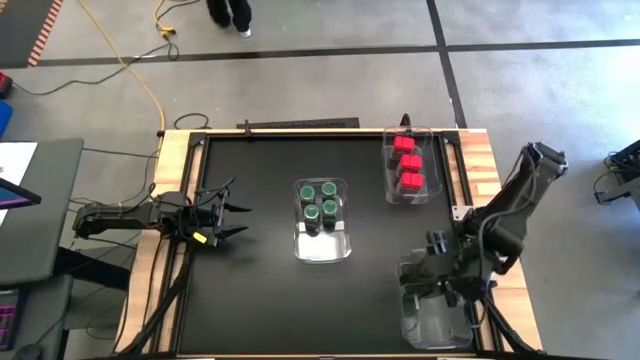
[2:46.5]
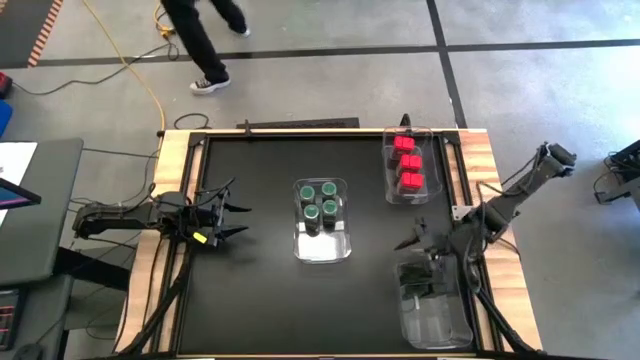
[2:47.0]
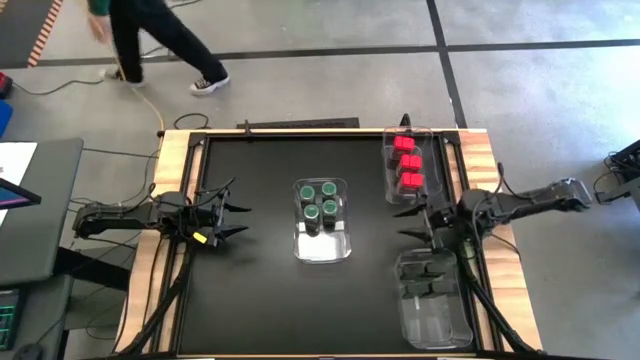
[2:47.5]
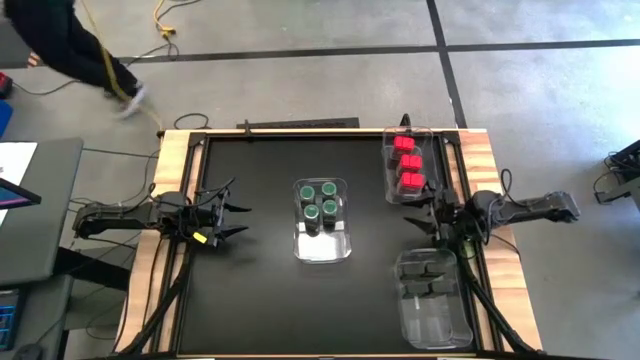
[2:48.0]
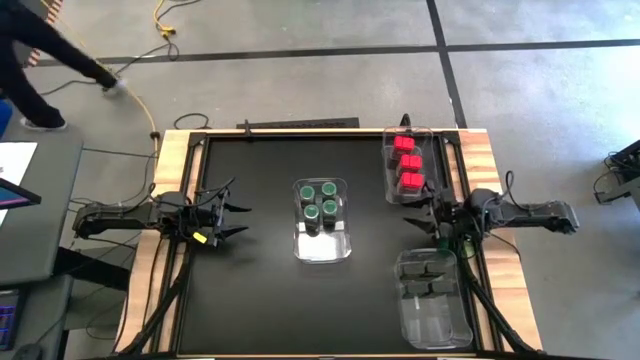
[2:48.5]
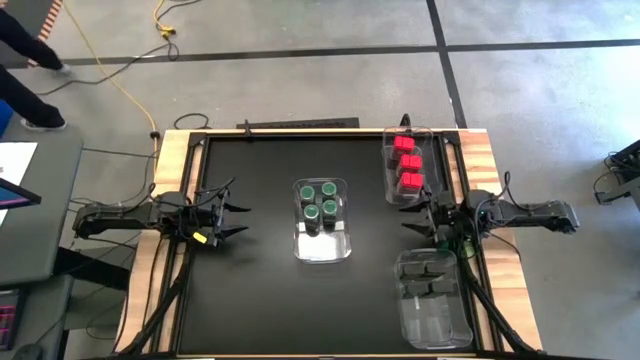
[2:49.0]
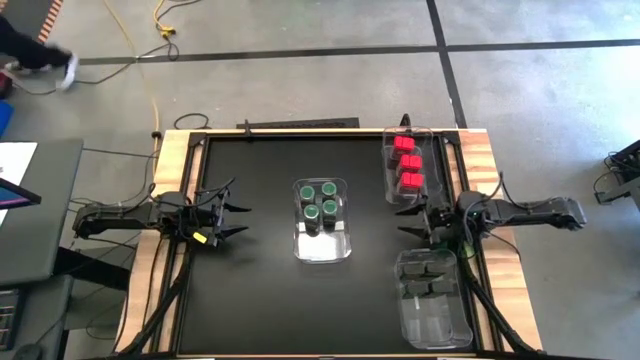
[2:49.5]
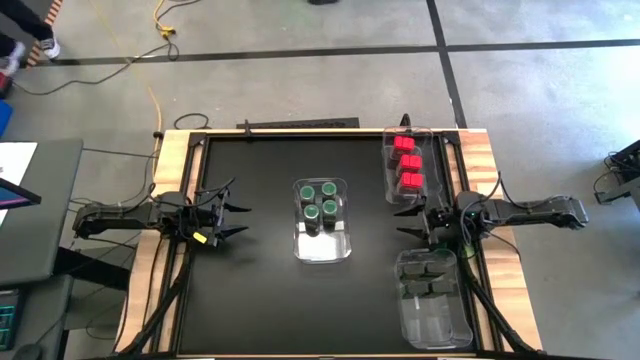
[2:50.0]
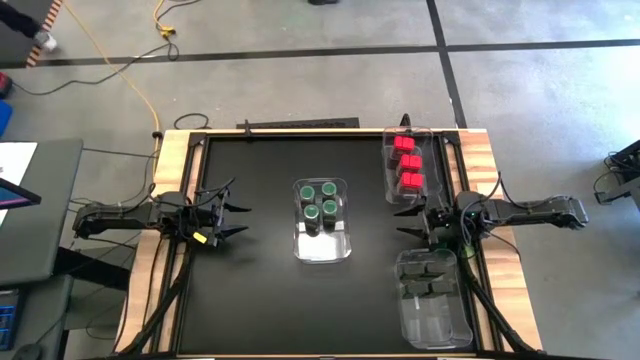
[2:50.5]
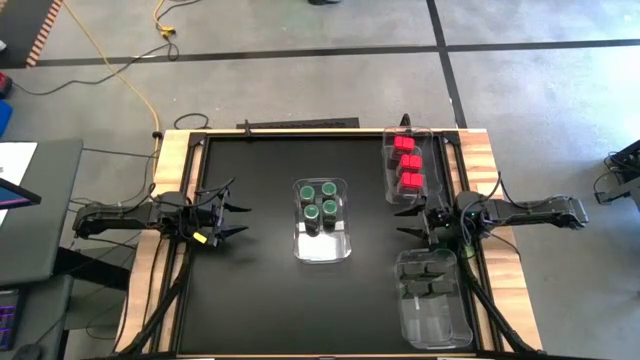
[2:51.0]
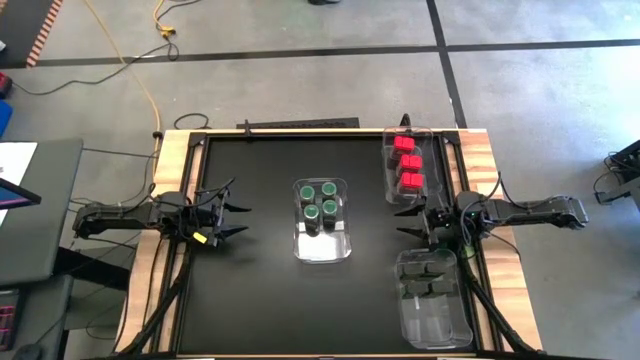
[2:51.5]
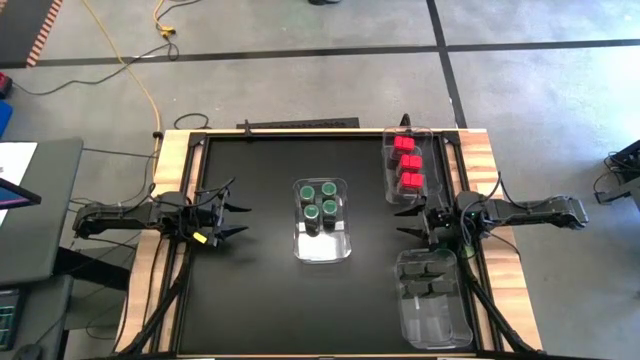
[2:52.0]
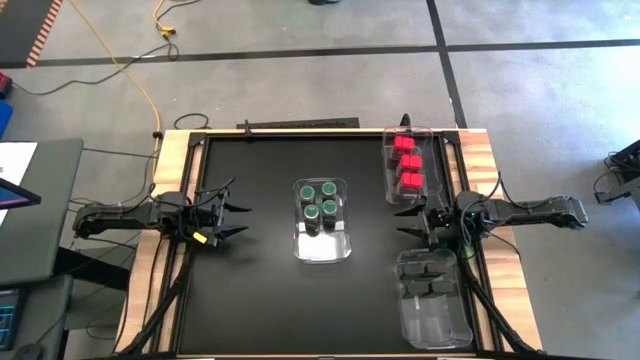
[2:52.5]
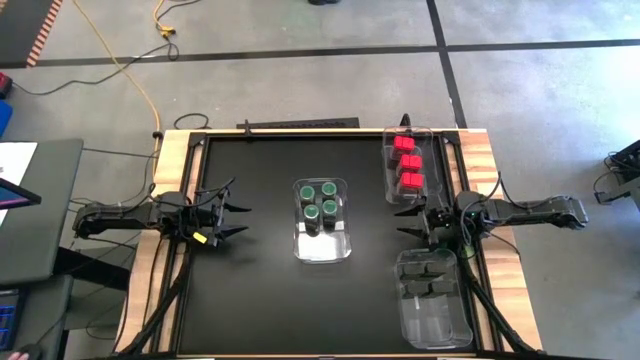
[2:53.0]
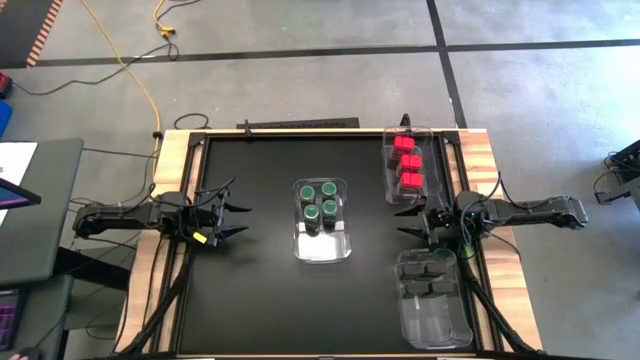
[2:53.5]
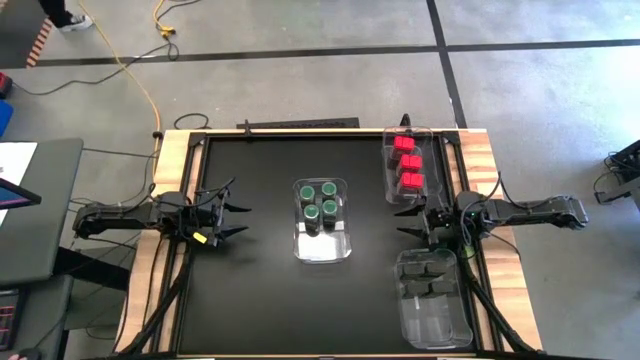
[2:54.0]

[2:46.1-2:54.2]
Task: Sort spices by type
Return to Home Position

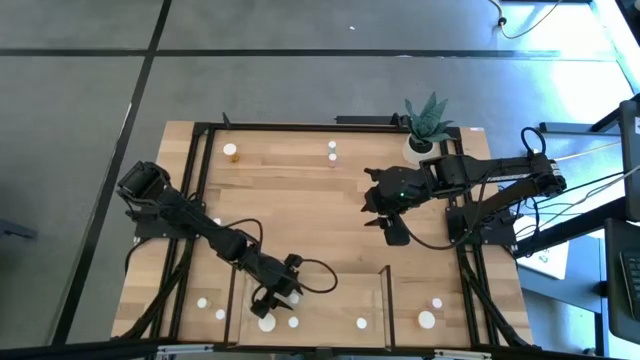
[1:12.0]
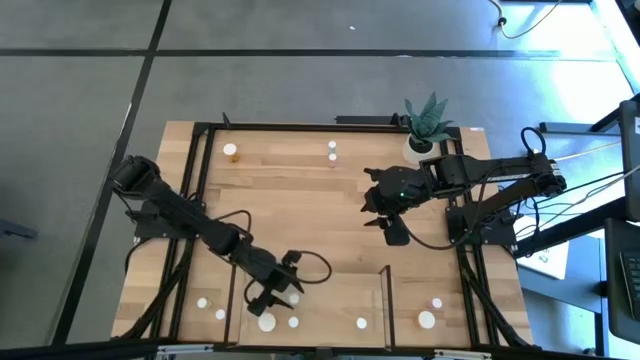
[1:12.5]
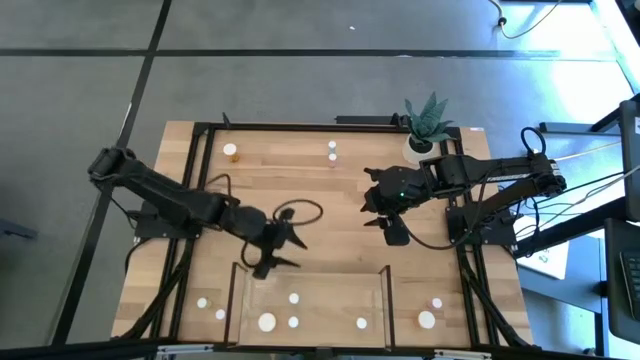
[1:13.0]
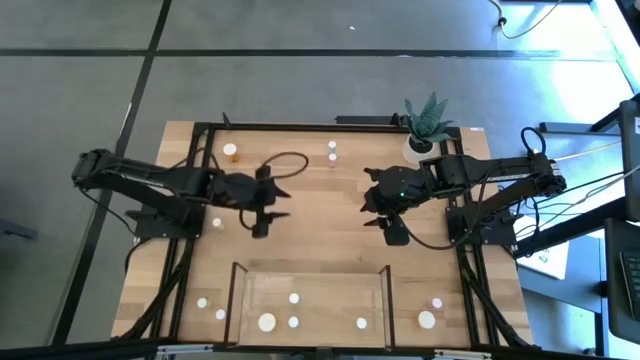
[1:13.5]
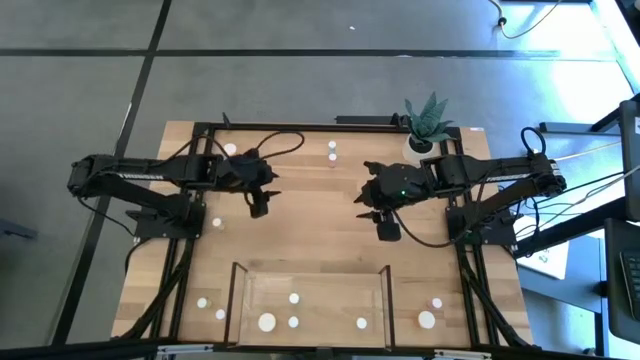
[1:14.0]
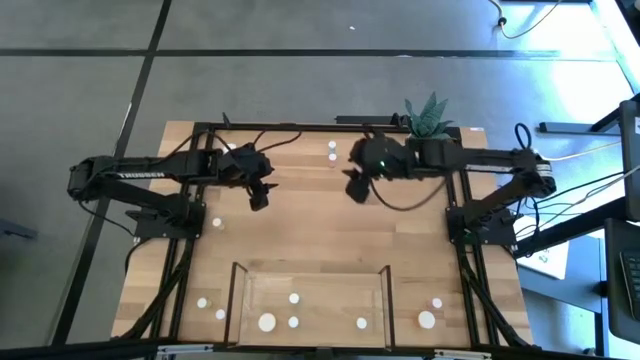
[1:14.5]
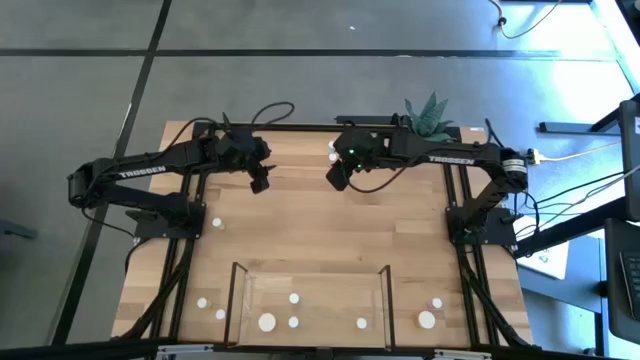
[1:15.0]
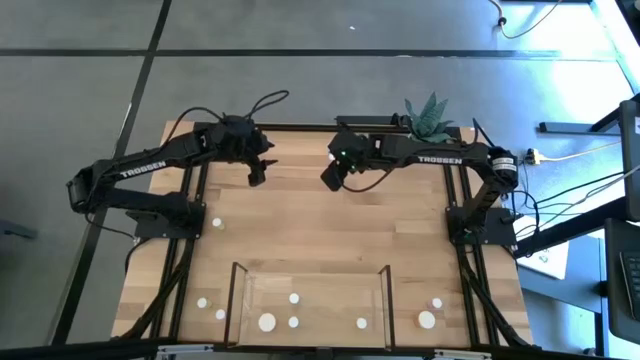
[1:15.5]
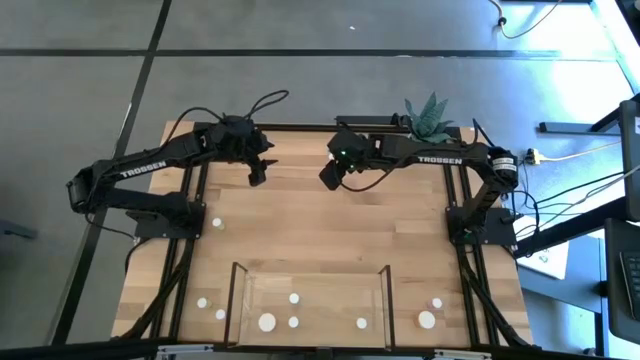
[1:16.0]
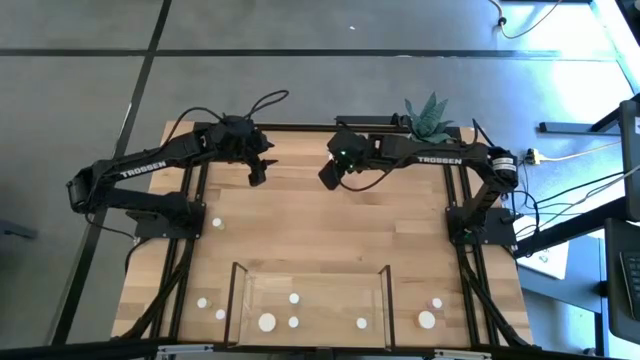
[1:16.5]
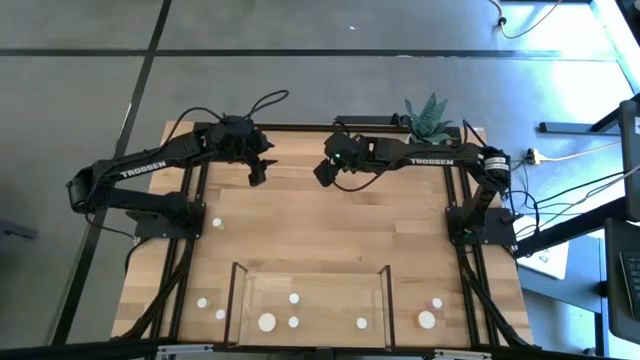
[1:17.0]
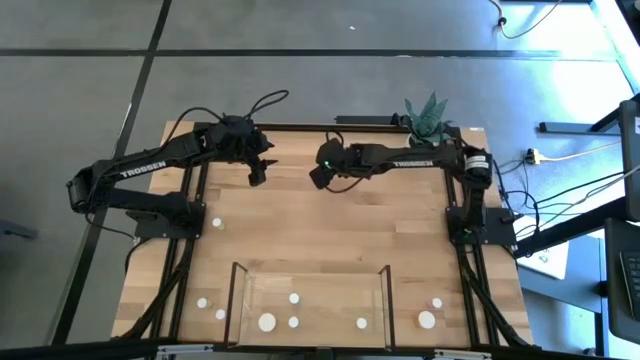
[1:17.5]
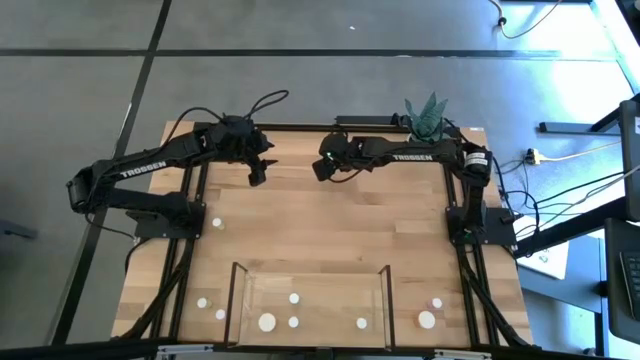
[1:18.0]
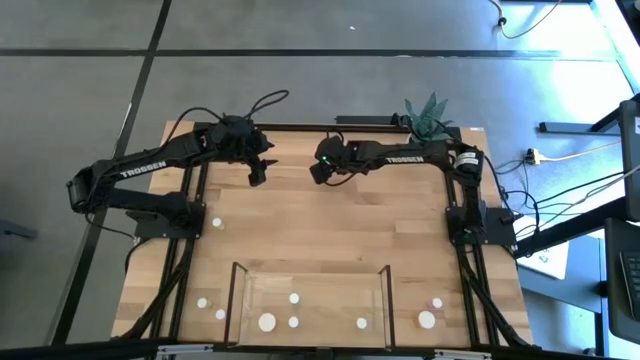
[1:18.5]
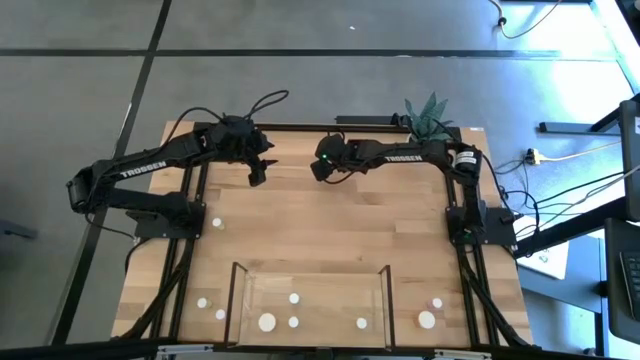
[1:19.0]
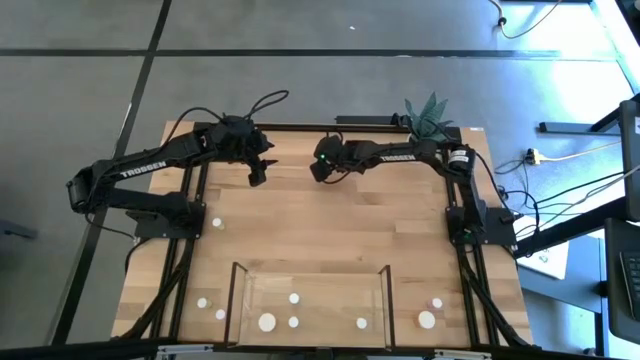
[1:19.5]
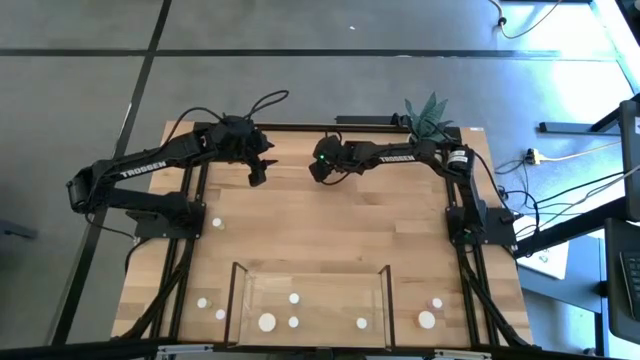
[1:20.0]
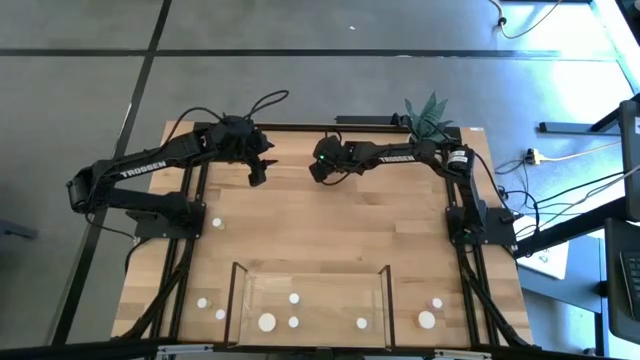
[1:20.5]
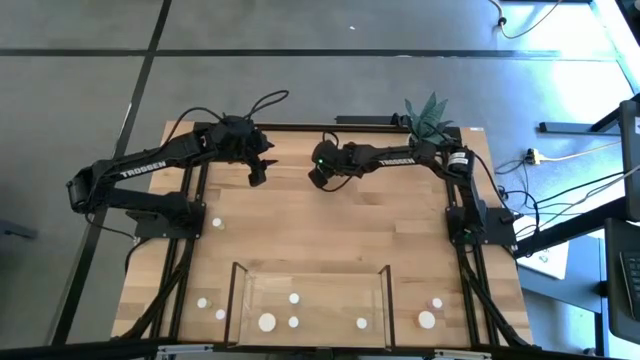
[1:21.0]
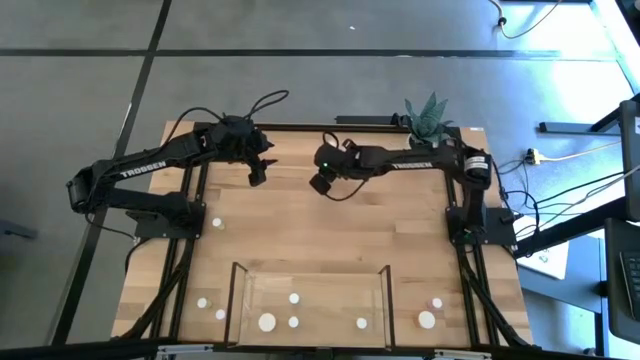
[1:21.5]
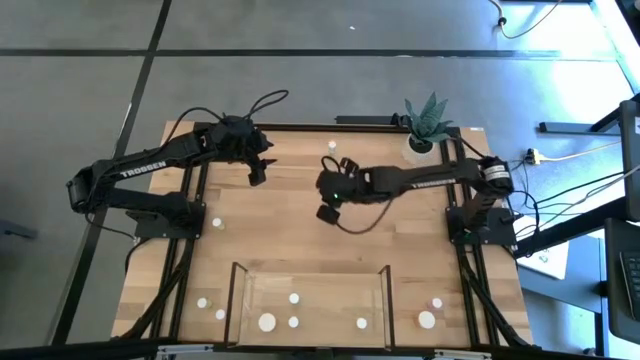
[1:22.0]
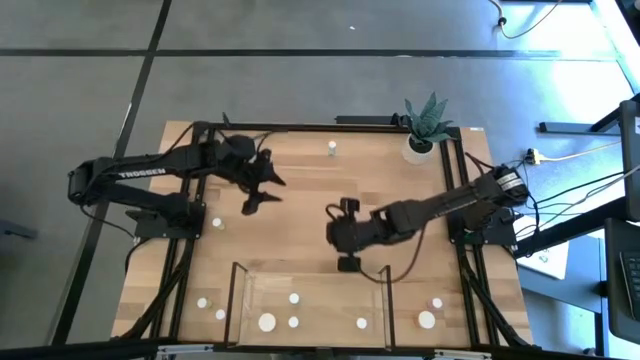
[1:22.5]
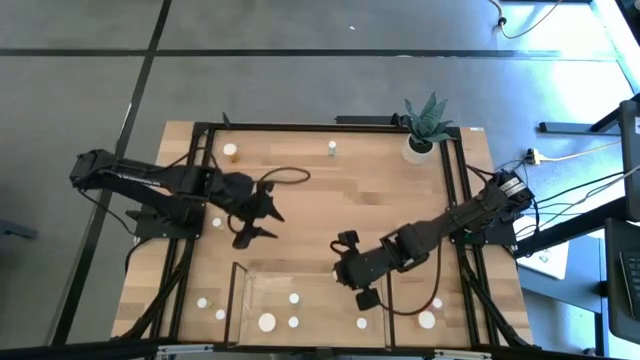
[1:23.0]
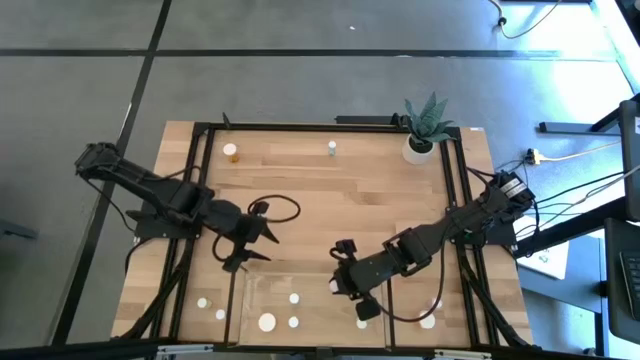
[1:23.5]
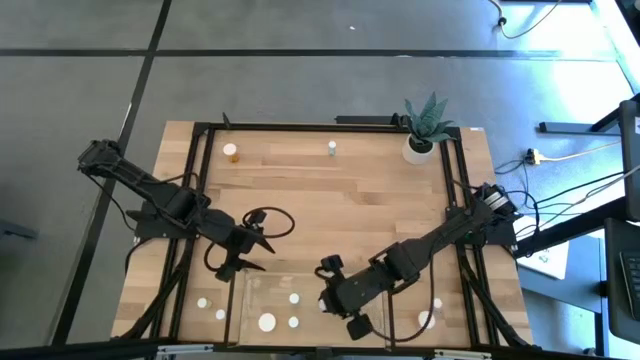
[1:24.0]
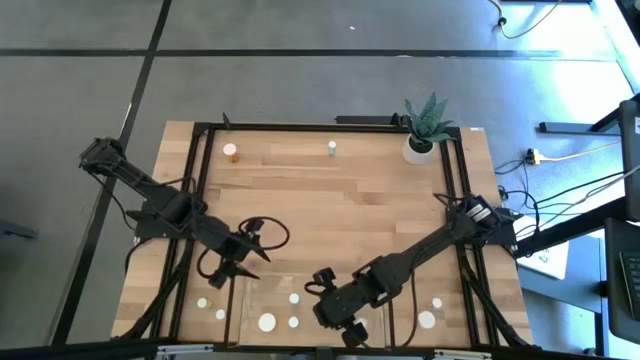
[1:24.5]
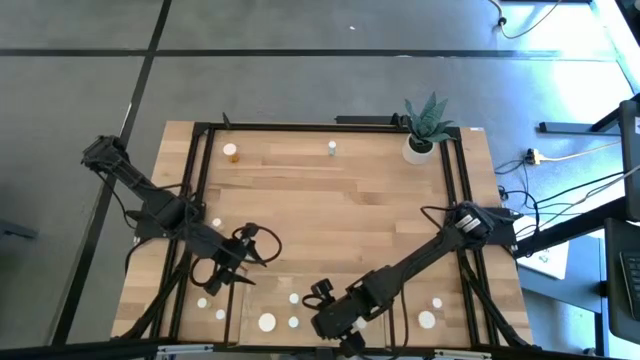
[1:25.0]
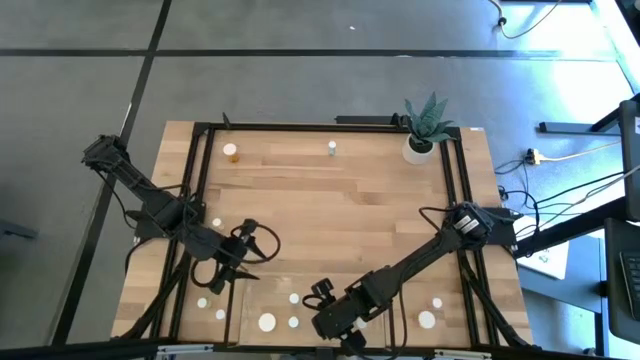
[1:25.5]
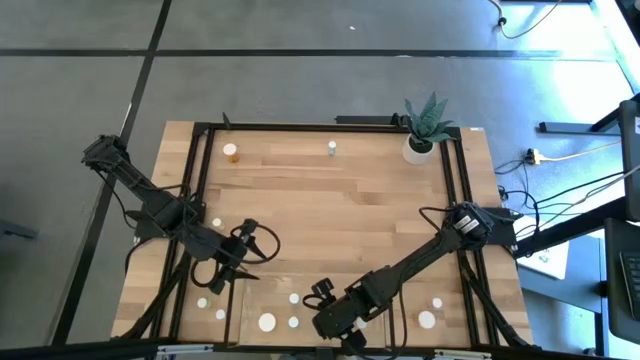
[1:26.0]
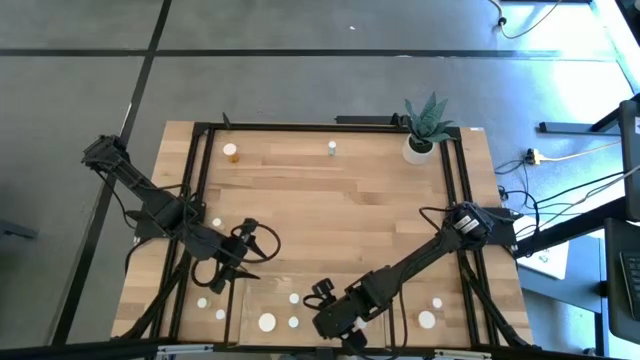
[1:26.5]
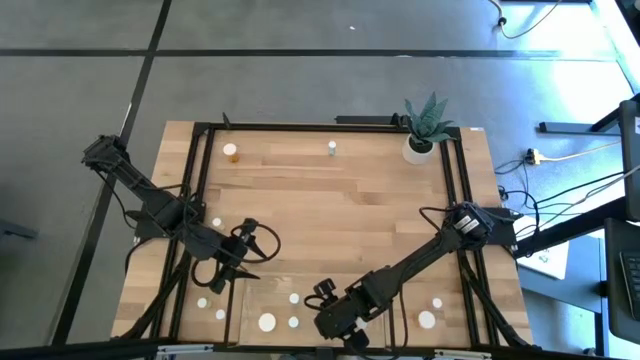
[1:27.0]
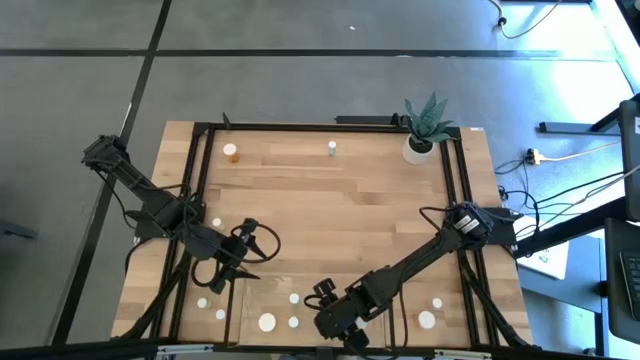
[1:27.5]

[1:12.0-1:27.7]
Task: Pick and place medicine bottles onto shelf by color
Put the top middle pink pill bottle on the shelf
